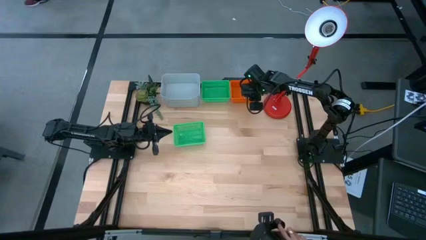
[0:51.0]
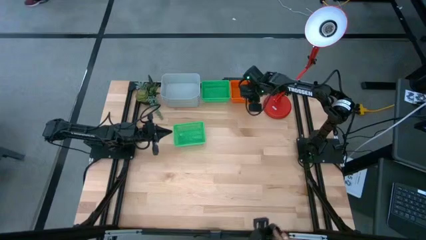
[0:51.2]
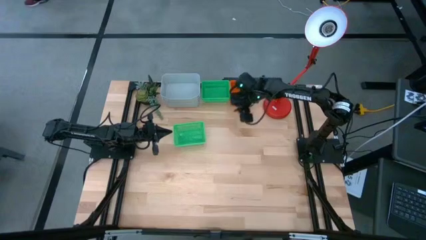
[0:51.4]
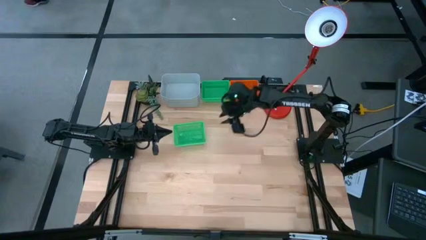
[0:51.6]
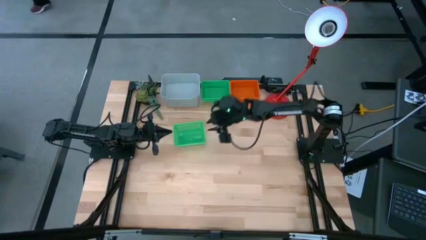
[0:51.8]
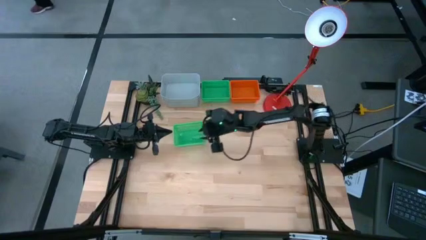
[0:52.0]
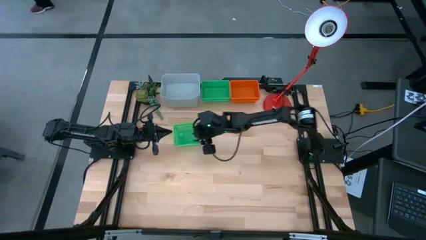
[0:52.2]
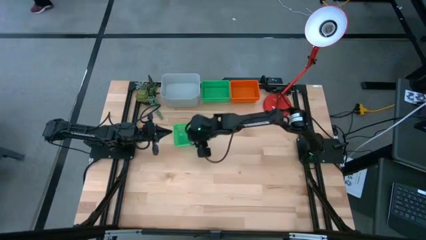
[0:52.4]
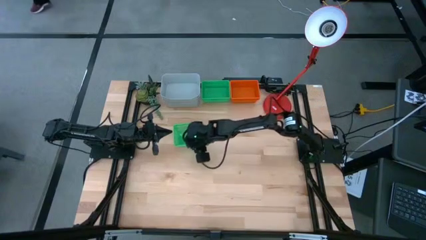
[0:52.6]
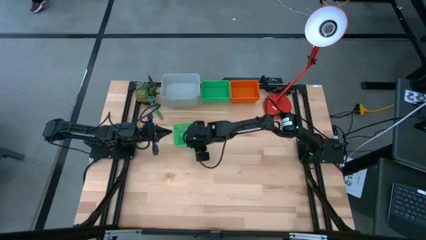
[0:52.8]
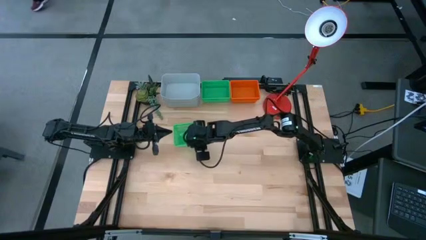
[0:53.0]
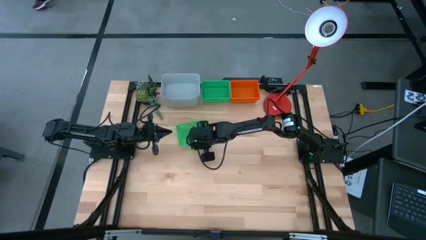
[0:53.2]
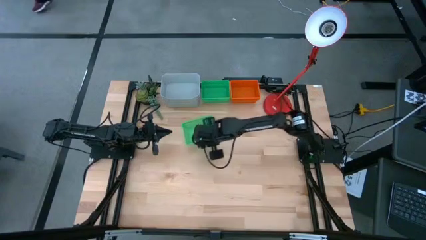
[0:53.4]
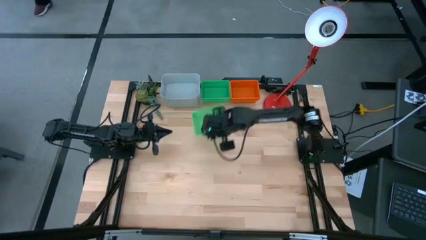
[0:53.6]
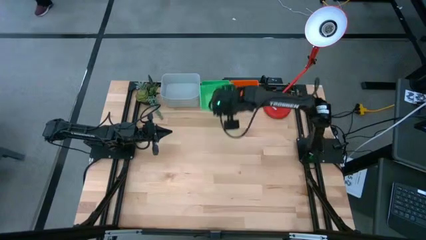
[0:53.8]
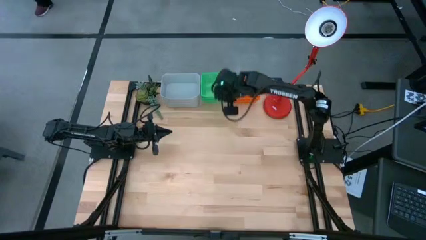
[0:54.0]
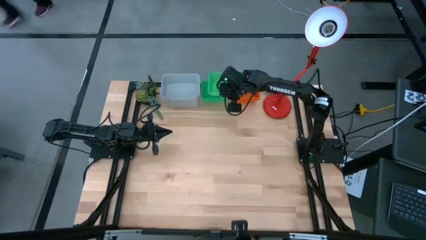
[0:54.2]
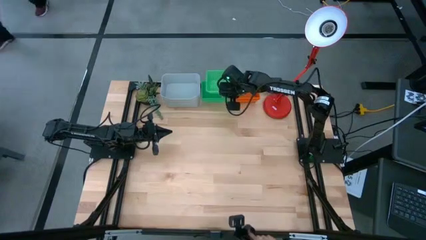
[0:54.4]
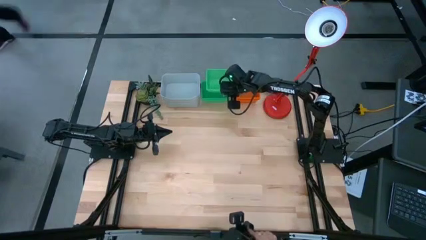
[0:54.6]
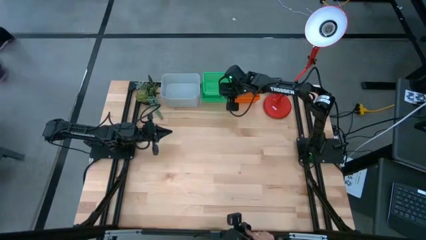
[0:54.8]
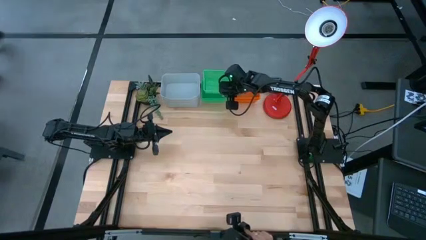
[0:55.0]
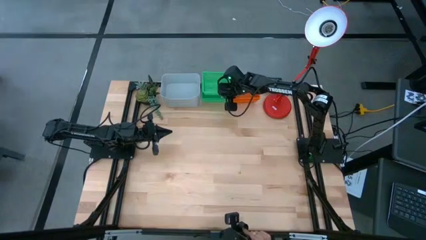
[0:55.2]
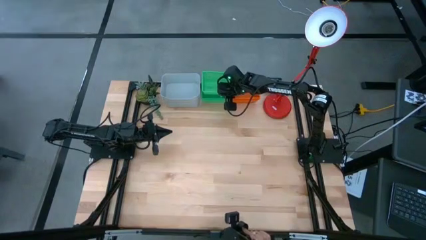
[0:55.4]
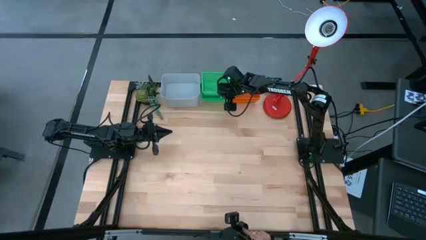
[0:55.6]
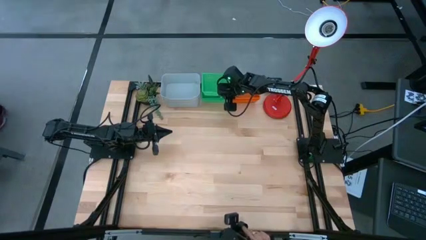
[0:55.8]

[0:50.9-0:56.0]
Stack the bottom green bin on top of the top green bin

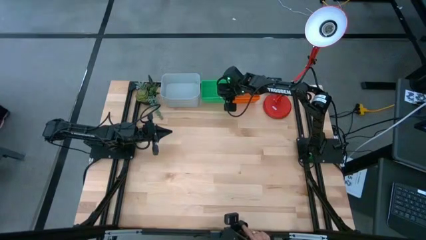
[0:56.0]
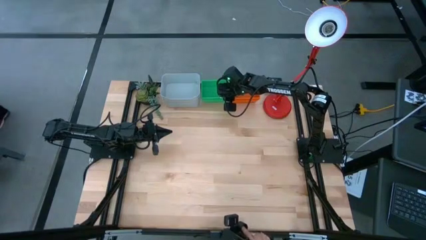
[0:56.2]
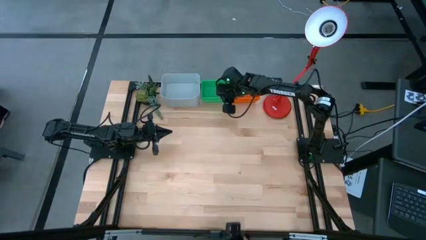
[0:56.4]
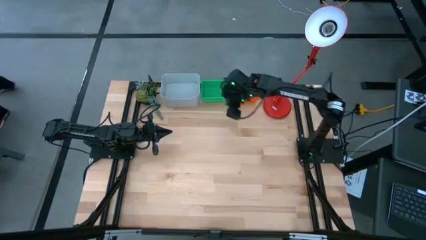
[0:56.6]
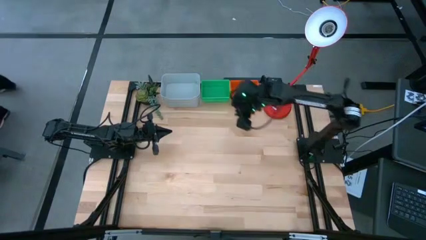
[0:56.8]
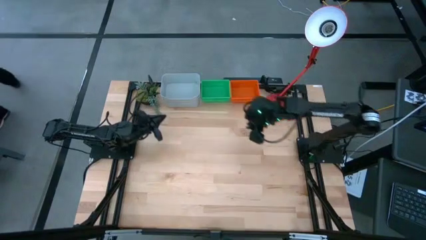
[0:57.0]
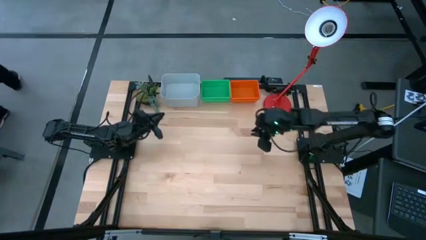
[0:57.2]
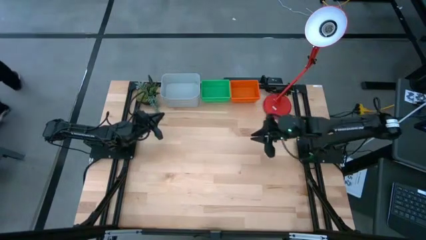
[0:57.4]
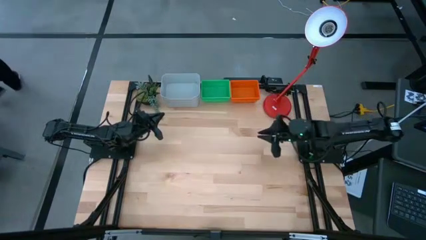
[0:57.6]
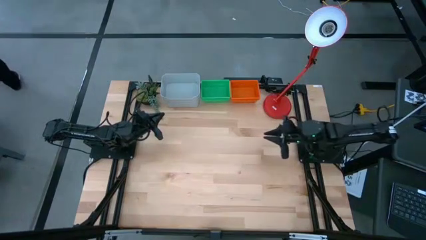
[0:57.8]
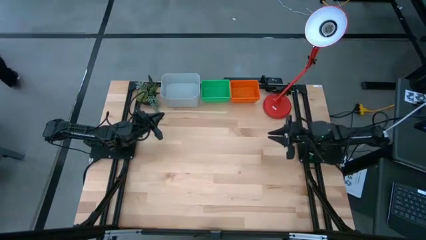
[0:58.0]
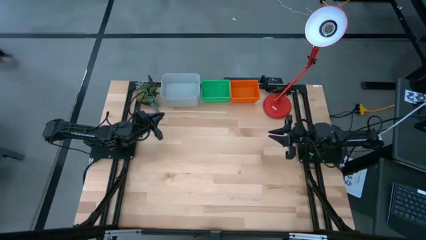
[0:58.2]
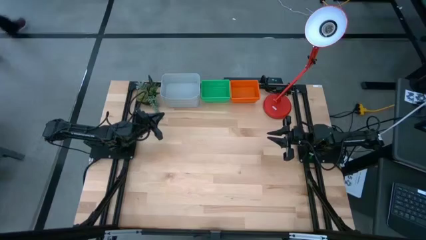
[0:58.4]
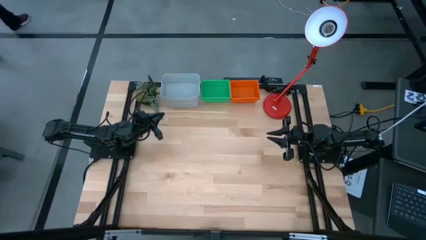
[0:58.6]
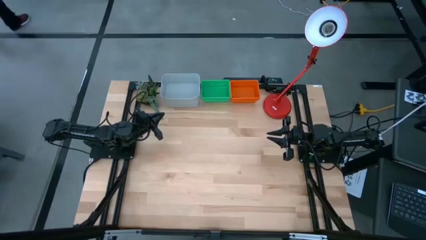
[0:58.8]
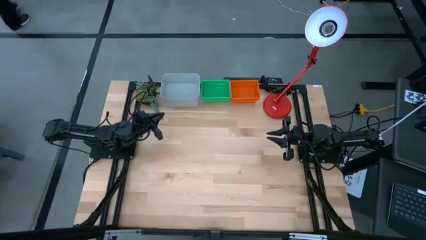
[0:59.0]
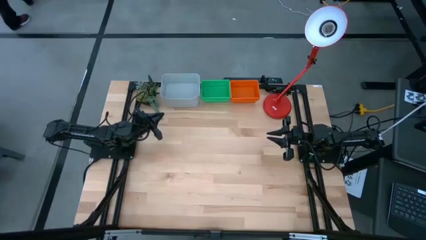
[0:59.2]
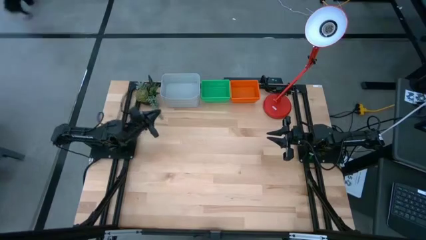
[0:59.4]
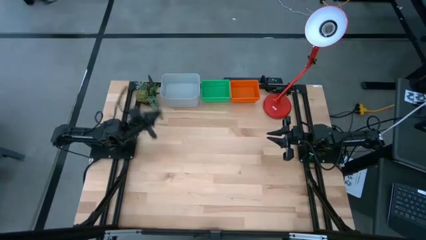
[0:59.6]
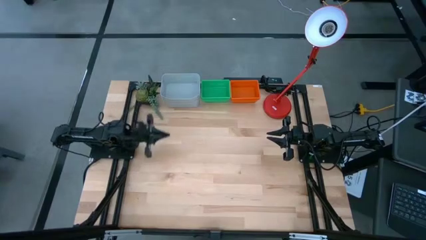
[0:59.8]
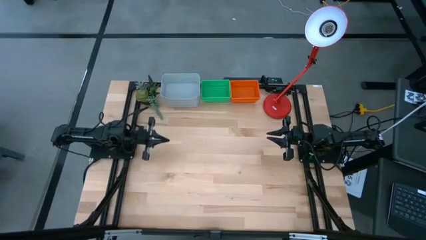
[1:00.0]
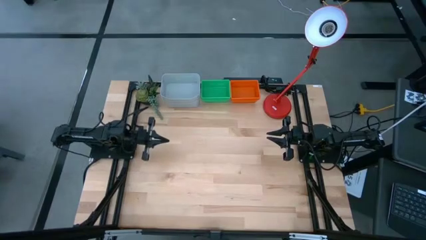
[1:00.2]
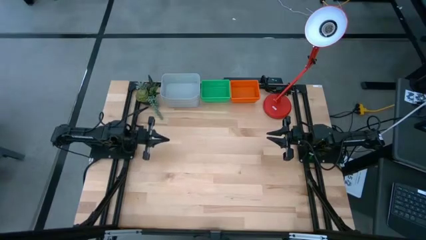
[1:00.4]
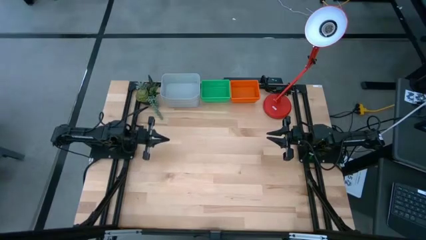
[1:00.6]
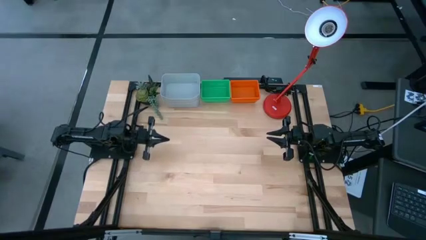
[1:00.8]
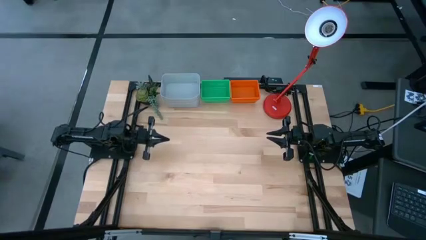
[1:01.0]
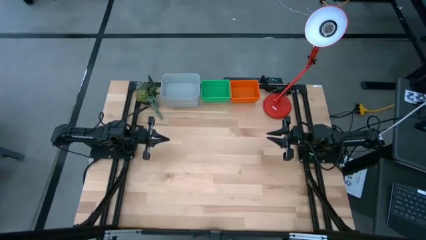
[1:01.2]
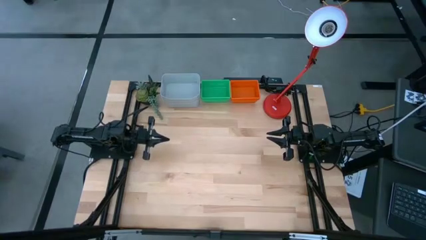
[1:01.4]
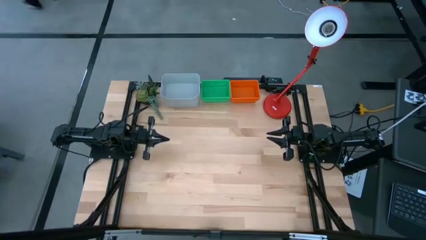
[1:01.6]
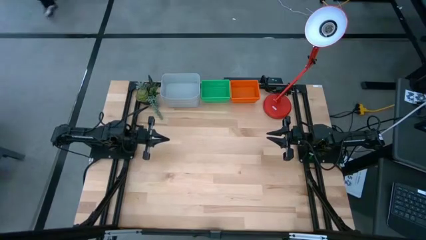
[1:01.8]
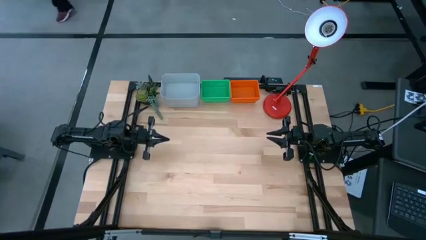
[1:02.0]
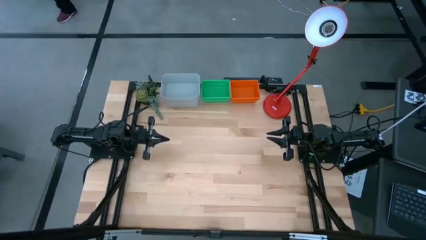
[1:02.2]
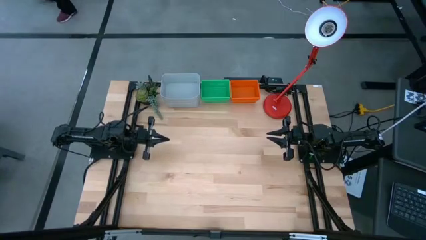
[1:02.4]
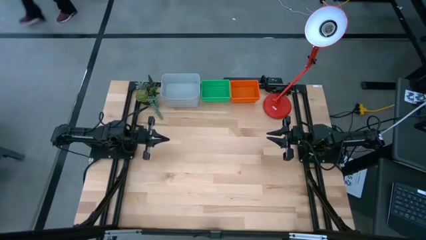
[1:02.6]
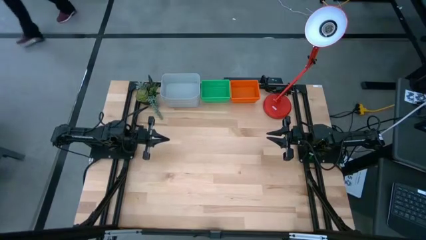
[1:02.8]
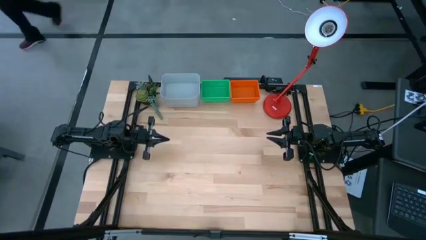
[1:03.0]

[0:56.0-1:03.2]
Return to Home Position
